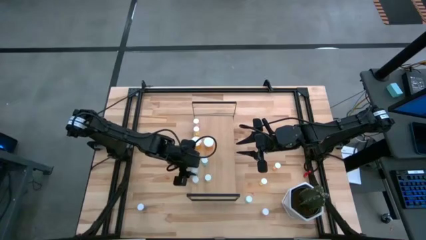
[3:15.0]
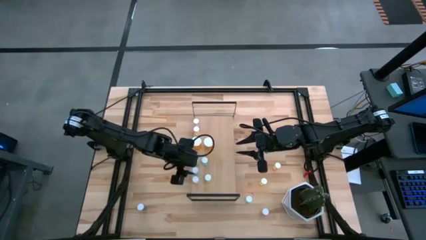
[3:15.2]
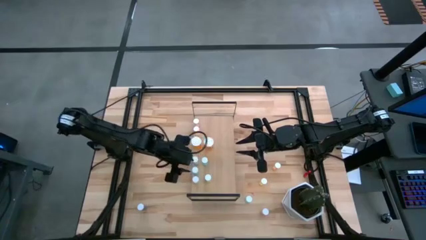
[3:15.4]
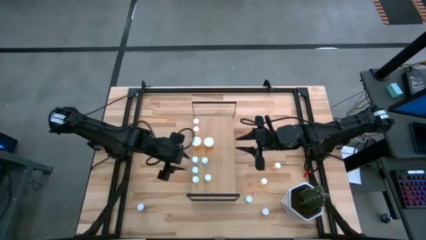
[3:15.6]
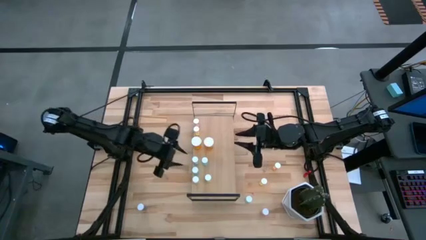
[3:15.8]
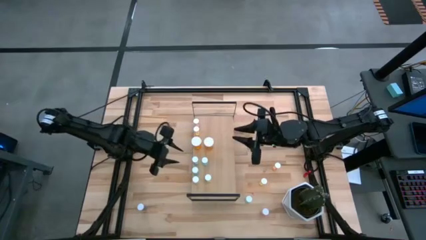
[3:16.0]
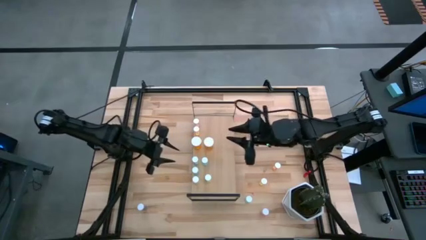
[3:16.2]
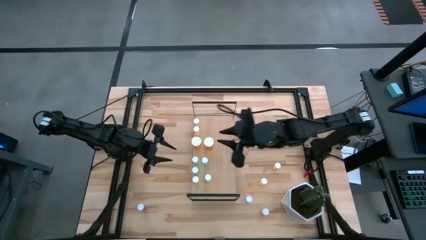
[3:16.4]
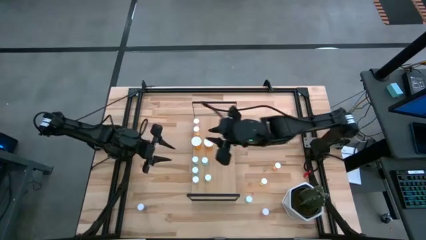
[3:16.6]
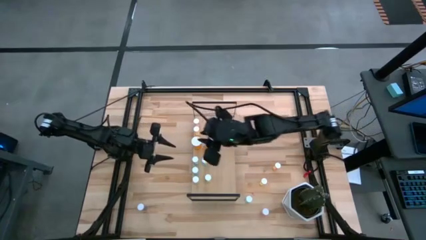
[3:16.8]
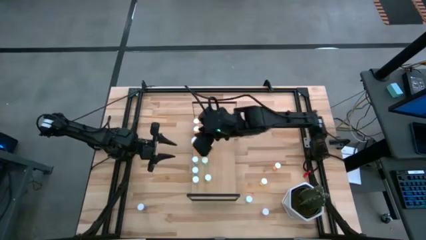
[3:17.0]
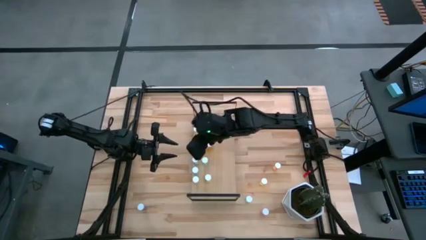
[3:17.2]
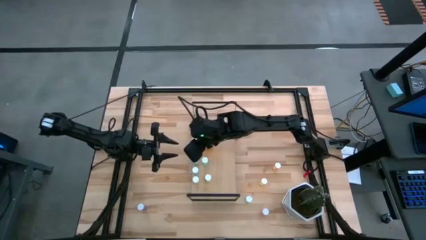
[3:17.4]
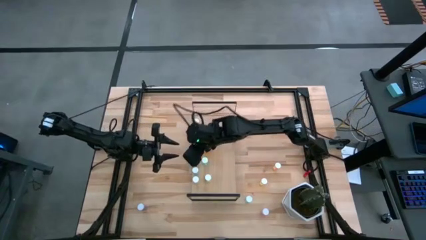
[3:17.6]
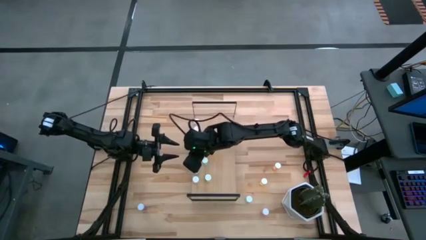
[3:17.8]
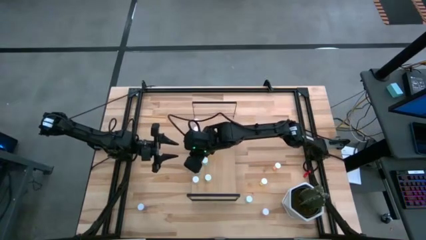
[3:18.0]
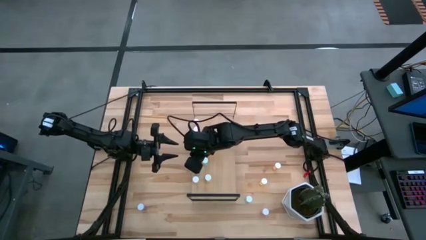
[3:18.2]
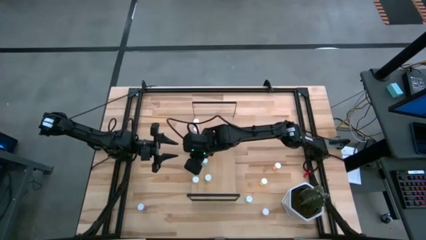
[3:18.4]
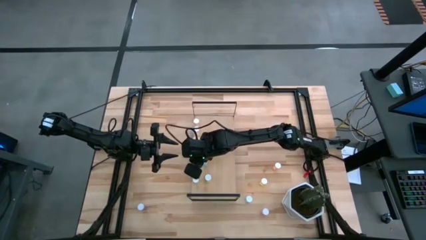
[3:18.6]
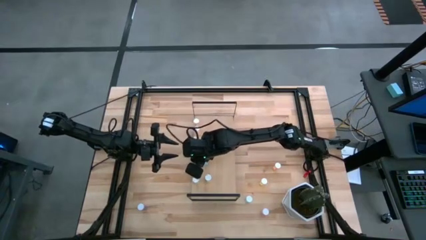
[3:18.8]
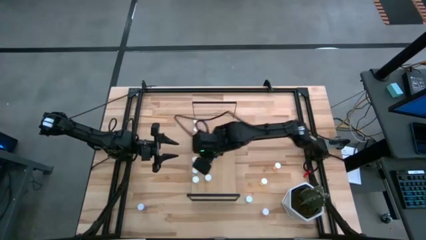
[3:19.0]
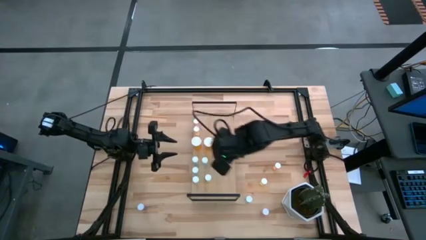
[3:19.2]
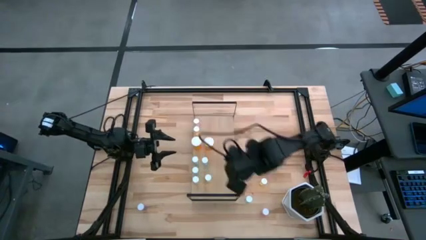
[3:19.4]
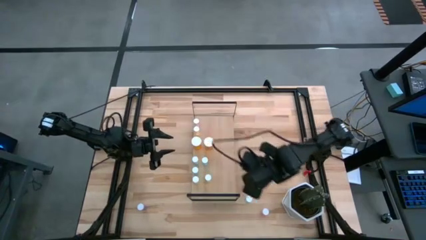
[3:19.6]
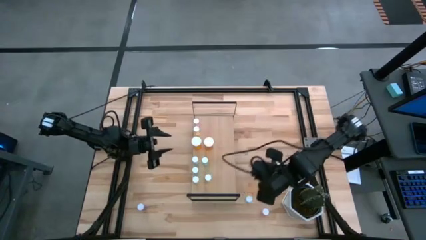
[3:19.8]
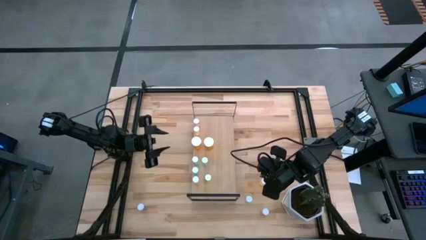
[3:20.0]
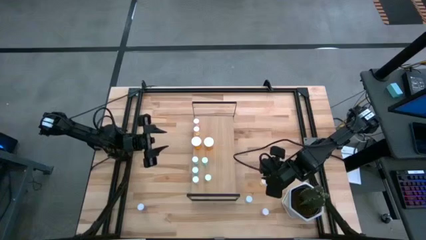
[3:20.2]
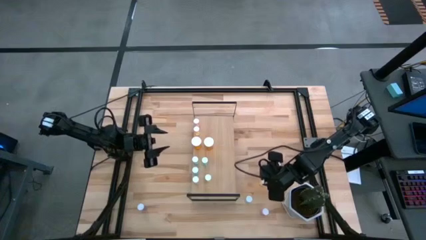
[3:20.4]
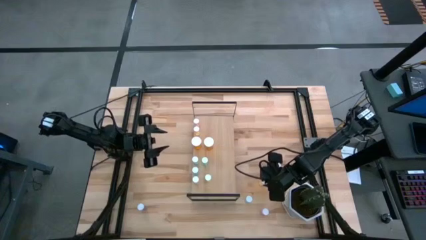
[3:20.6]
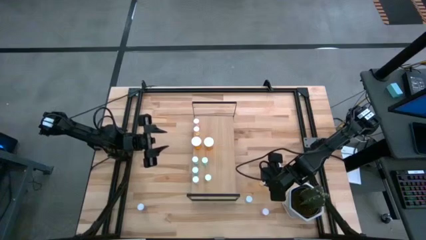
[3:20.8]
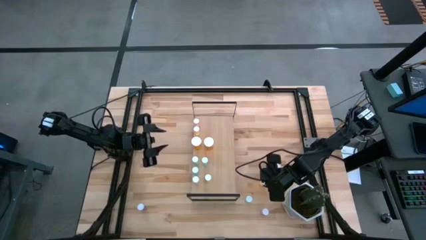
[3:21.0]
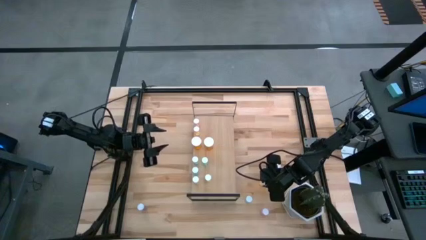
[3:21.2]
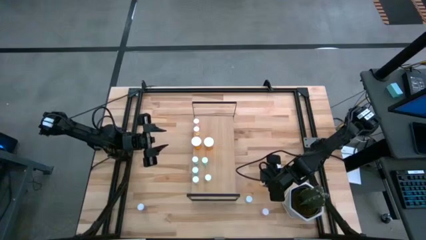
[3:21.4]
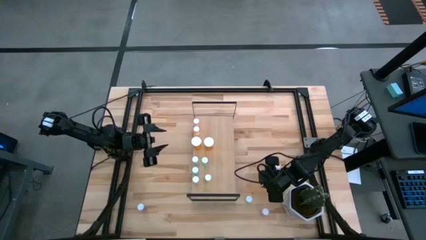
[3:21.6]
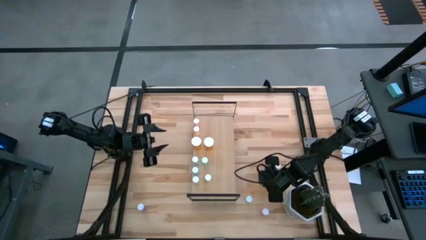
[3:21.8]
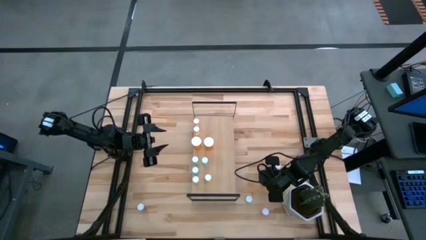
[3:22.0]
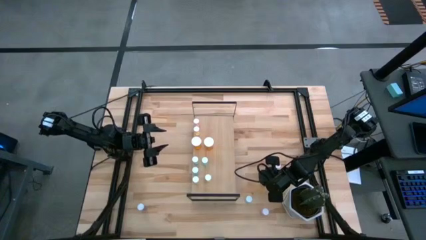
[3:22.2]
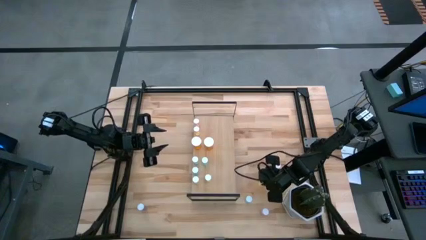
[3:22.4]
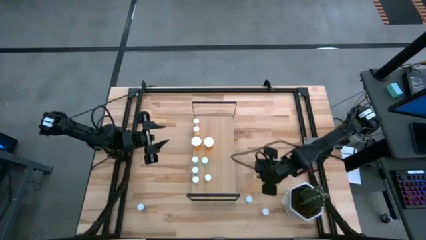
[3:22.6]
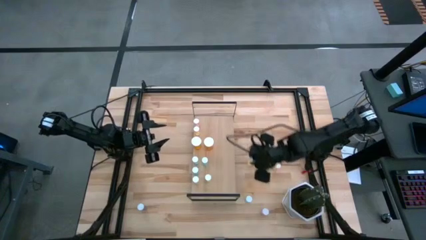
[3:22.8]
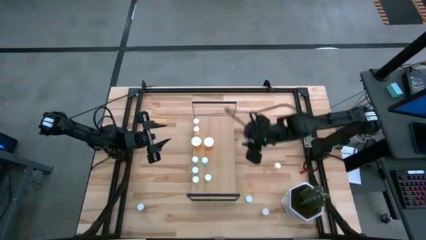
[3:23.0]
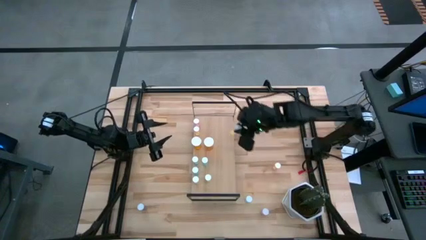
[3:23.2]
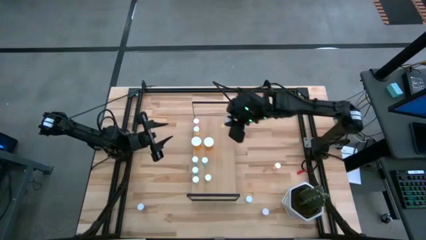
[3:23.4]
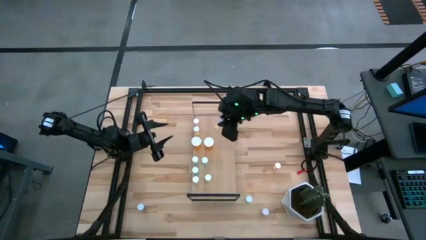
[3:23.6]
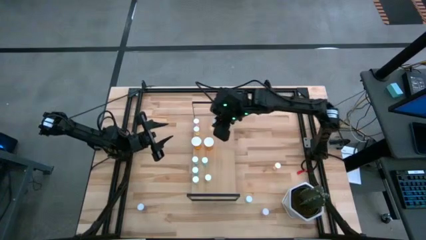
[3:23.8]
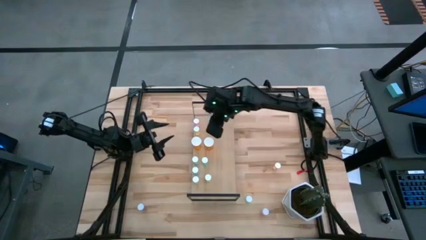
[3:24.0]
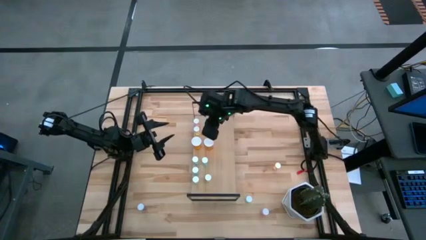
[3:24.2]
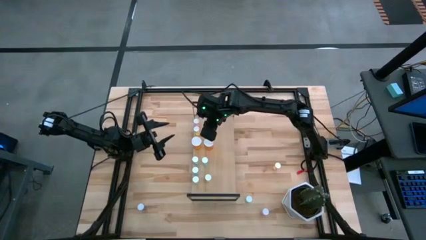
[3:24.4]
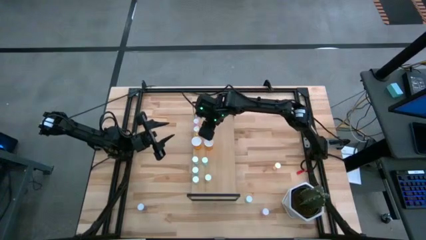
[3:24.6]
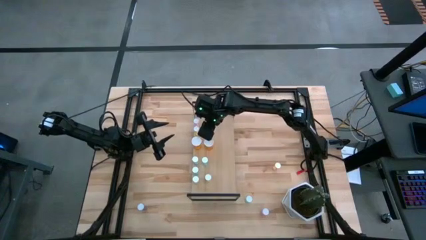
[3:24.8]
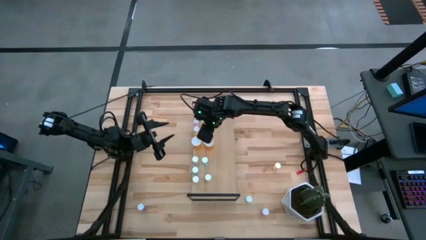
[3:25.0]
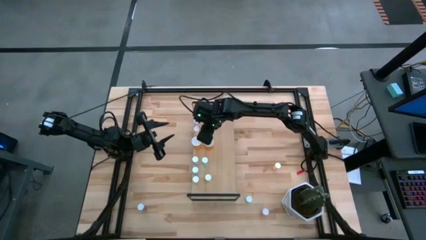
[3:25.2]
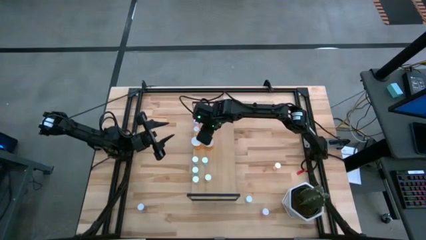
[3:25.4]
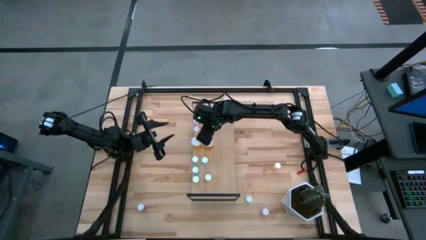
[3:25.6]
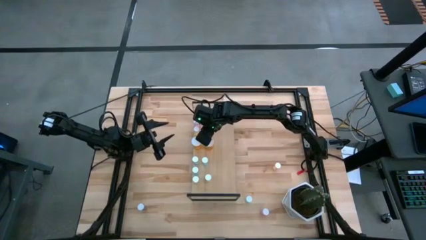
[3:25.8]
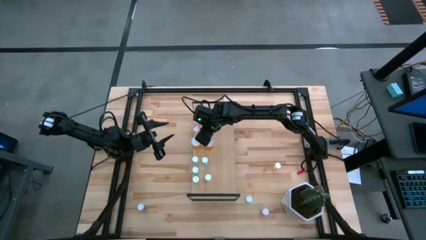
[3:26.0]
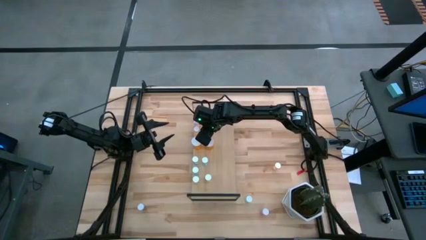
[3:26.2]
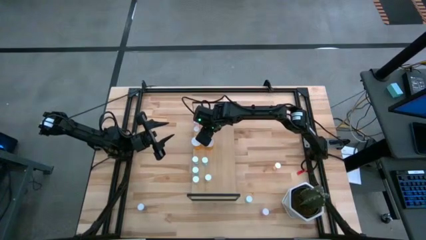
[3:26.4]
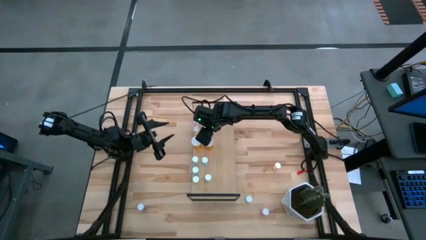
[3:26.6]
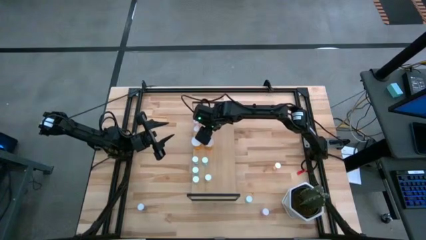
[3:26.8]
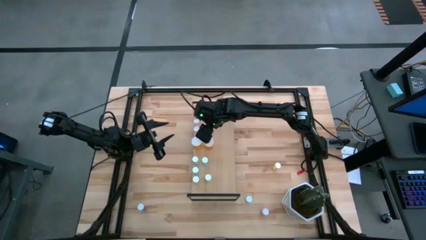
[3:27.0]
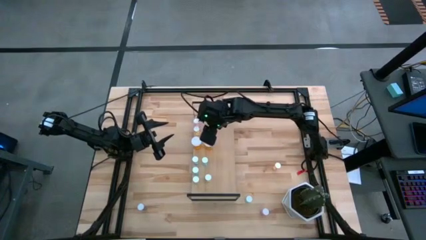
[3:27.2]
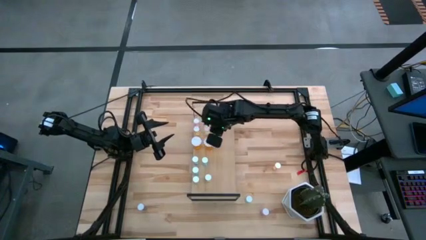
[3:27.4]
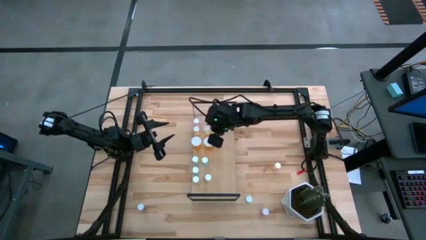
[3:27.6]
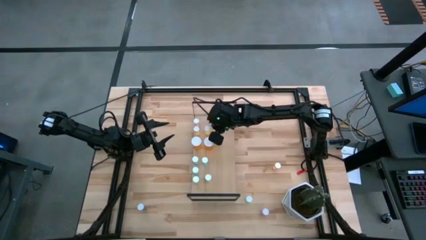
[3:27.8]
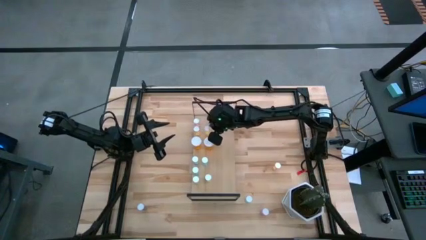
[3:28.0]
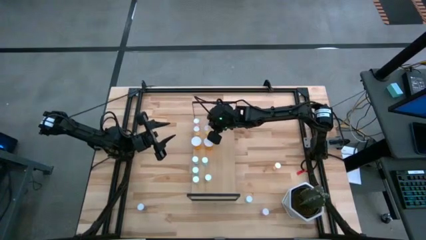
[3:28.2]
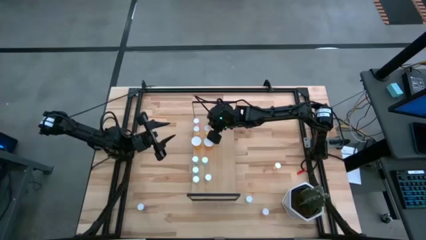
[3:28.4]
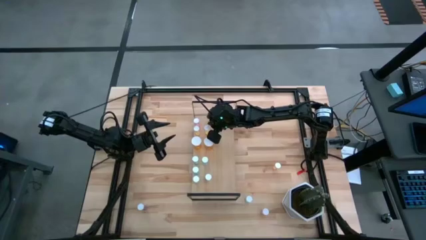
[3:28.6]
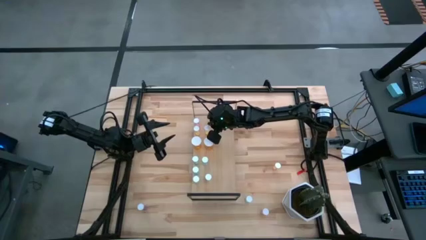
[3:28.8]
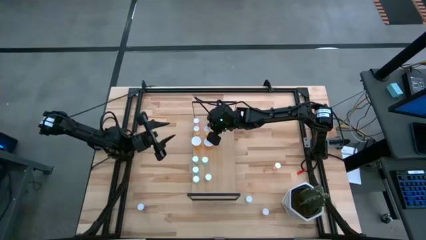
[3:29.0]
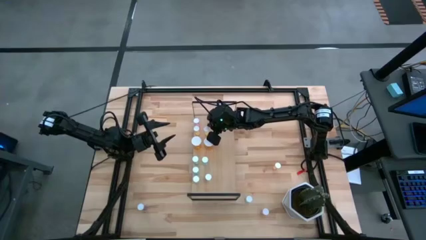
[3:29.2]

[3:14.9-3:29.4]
Task: Pick and place medicine bottles onto shelf by color
Put the yellow pill bottle aligned with the other yellow pill bottles on the shelf

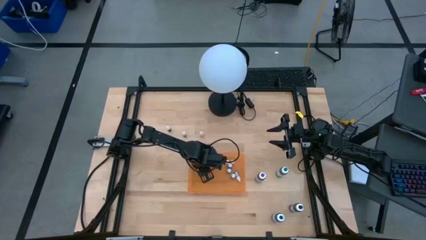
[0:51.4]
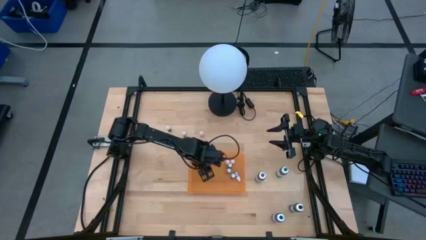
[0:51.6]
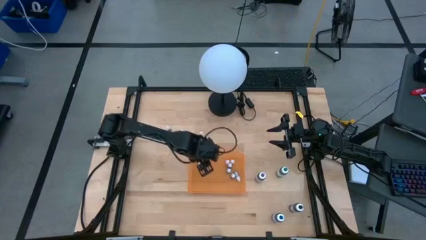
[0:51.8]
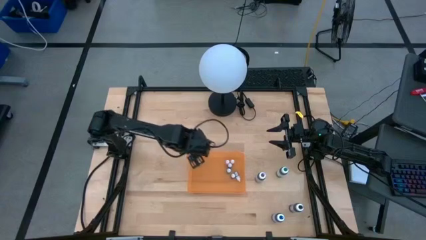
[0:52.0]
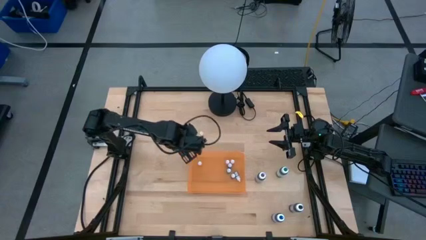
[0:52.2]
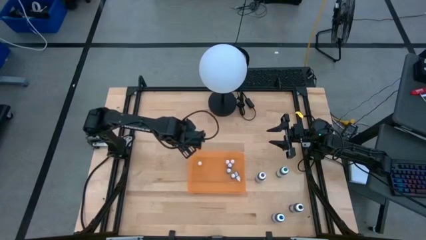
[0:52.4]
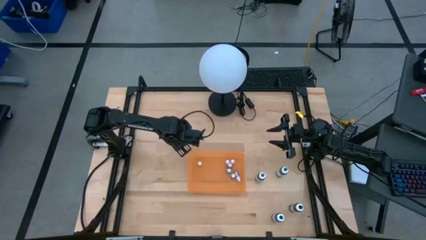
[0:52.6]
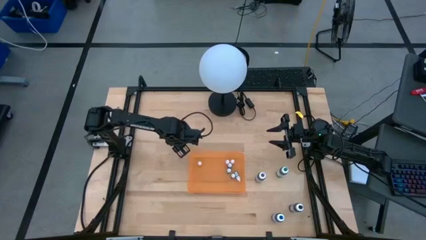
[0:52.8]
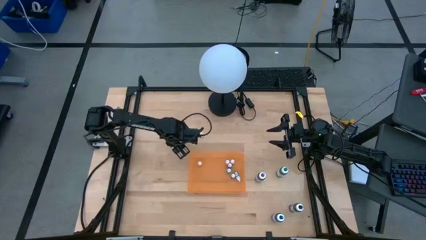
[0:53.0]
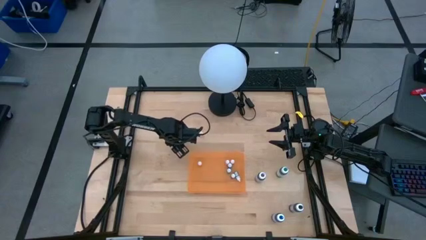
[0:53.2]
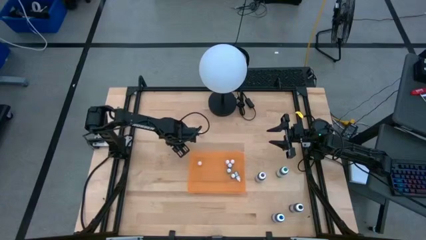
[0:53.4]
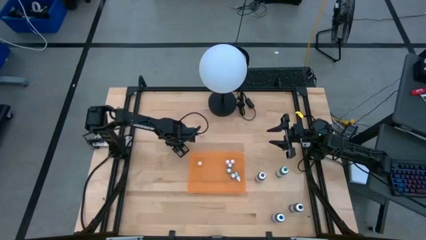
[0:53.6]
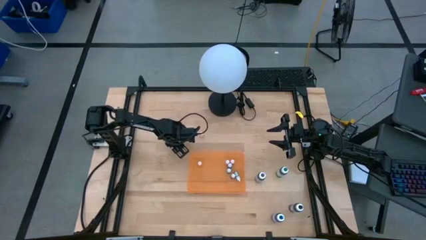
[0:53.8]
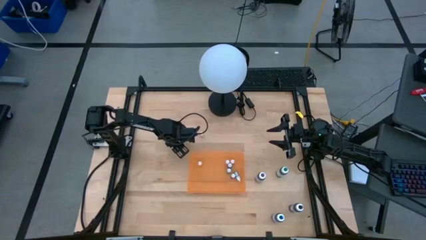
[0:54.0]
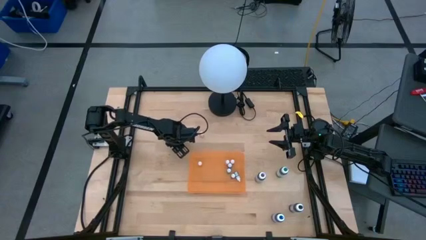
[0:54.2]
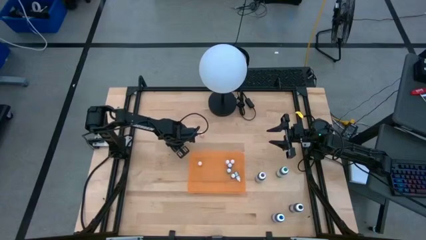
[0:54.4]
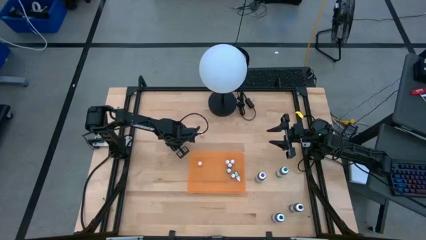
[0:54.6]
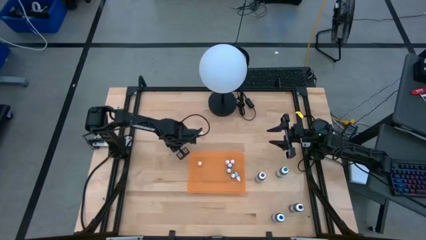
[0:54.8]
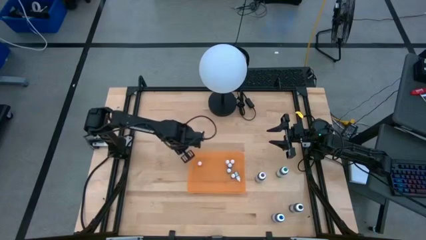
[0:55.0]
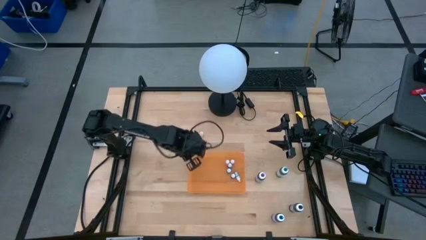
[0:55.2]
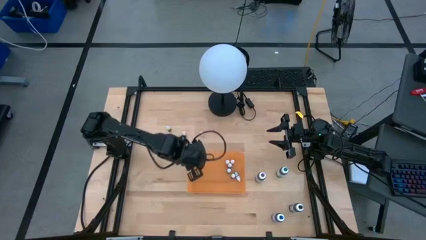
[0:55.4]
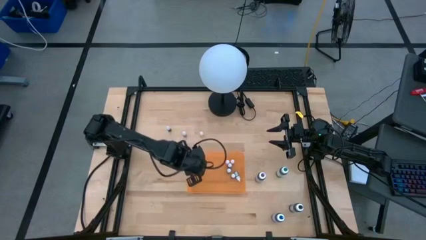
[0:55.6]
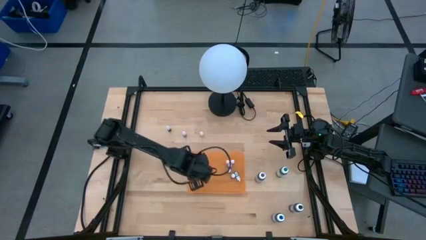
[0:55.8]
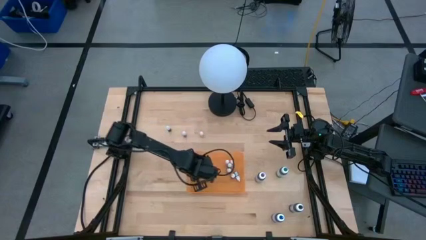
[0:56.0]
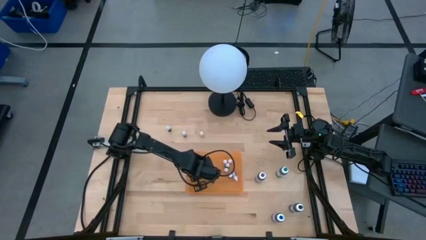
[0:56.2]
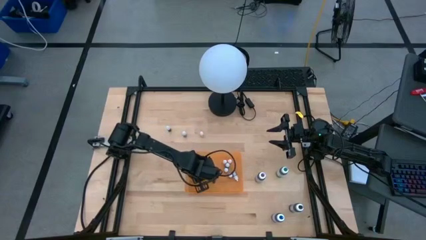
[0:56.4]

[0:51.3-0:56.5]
Task: Pick & Place food coloring
Put the small black food coloring bottle into the orange container
